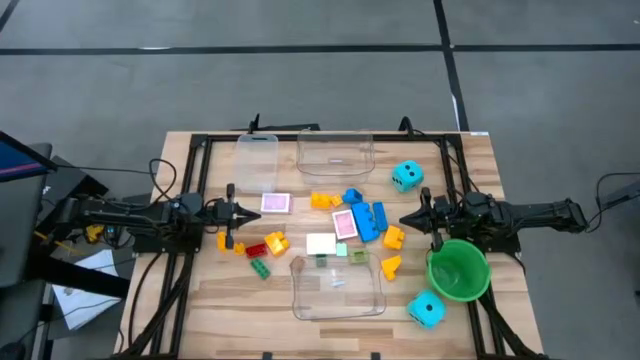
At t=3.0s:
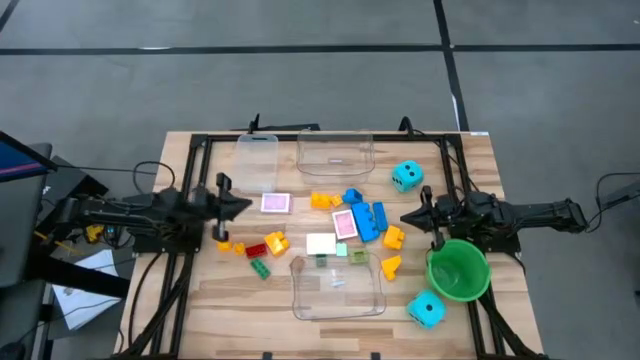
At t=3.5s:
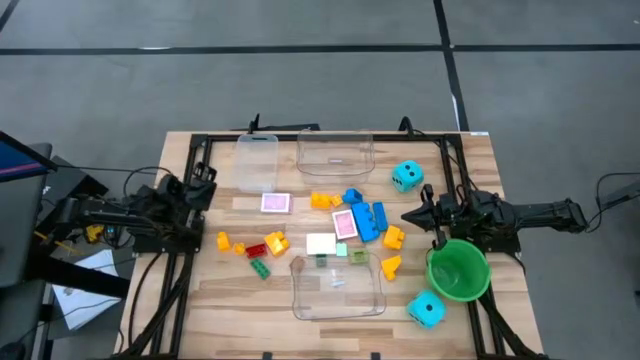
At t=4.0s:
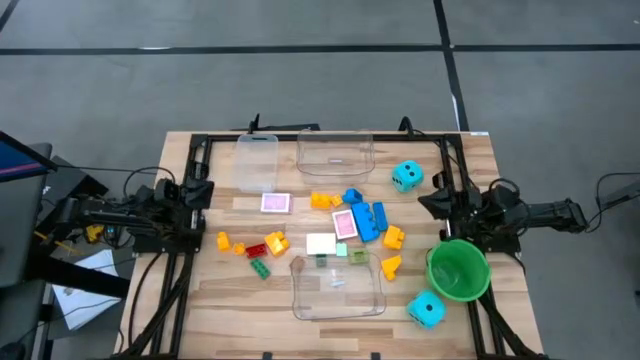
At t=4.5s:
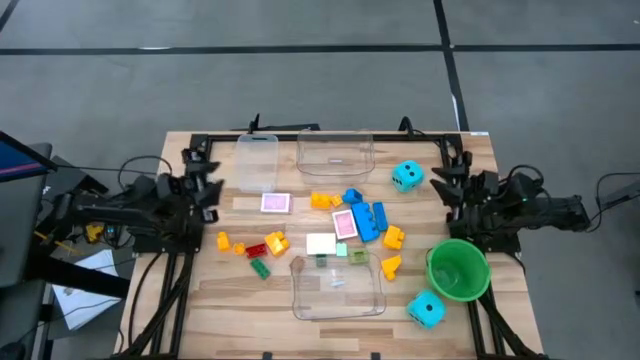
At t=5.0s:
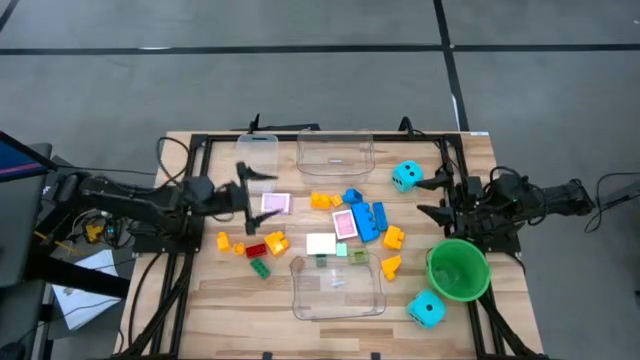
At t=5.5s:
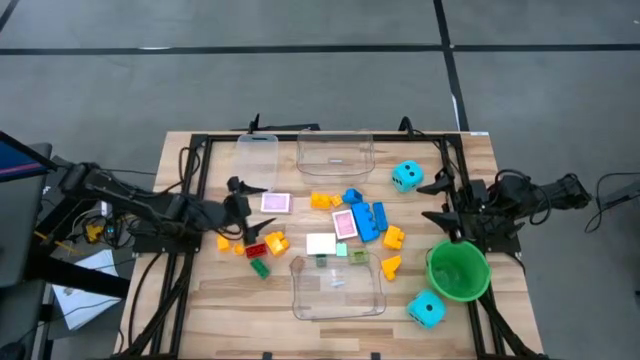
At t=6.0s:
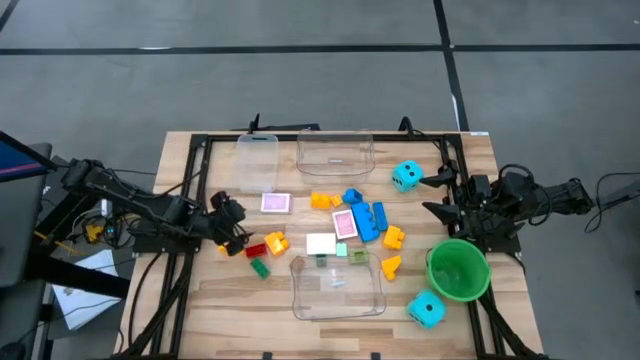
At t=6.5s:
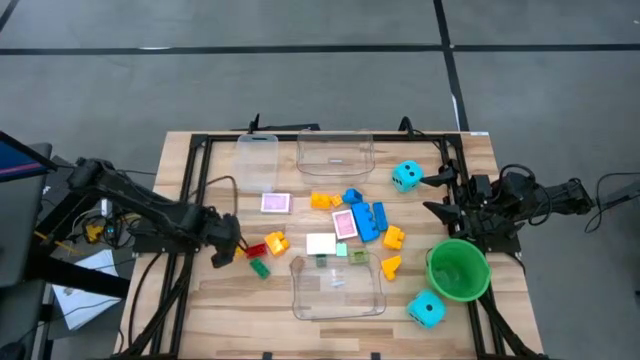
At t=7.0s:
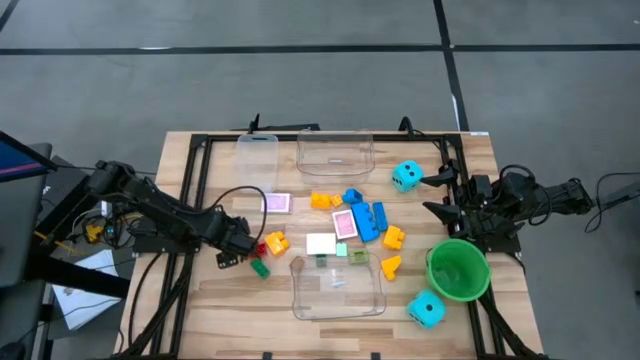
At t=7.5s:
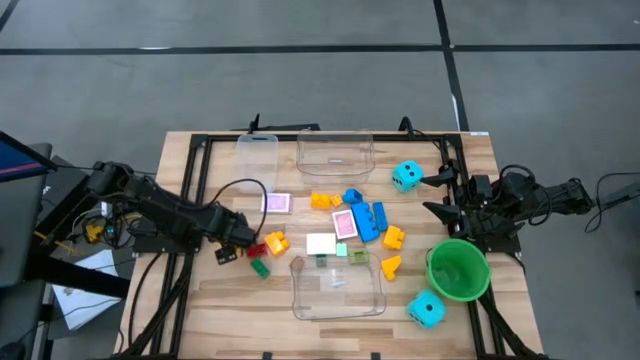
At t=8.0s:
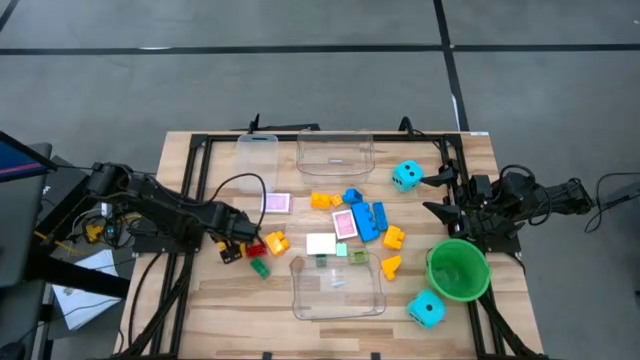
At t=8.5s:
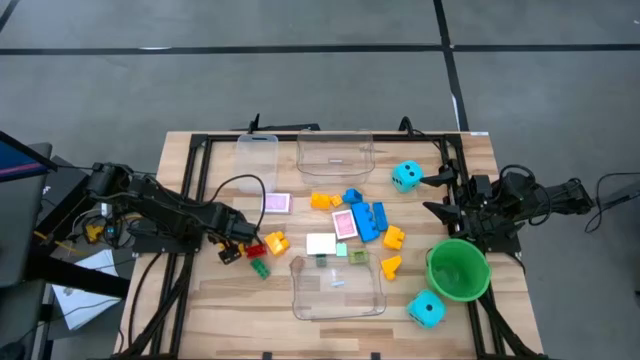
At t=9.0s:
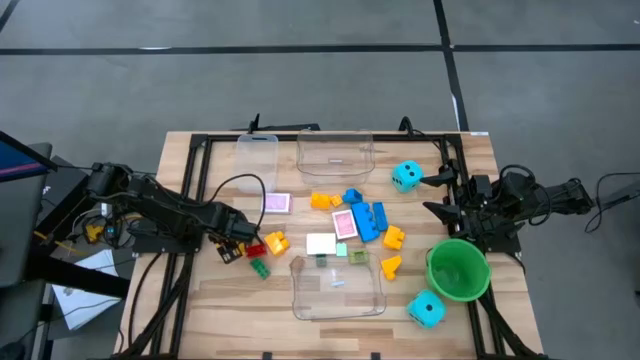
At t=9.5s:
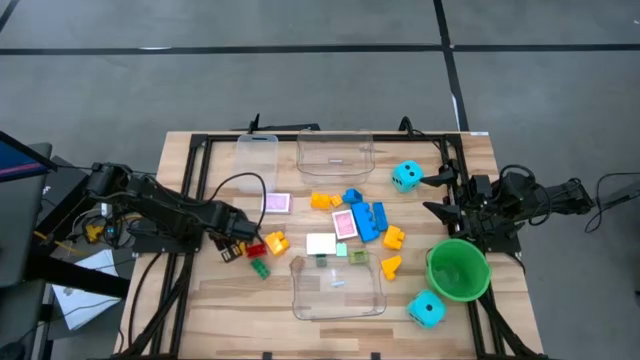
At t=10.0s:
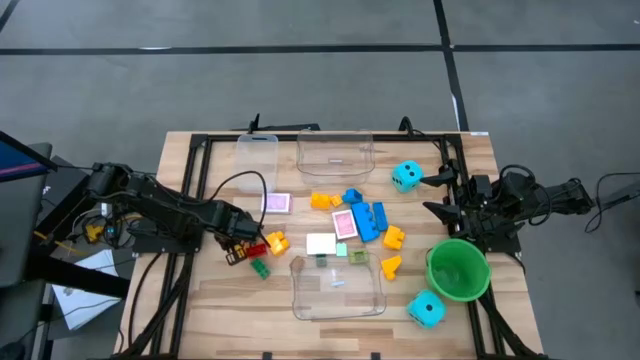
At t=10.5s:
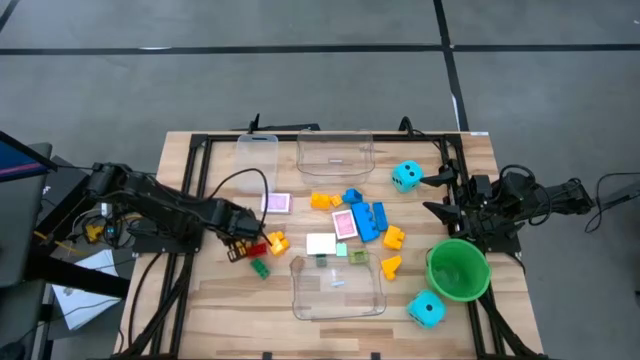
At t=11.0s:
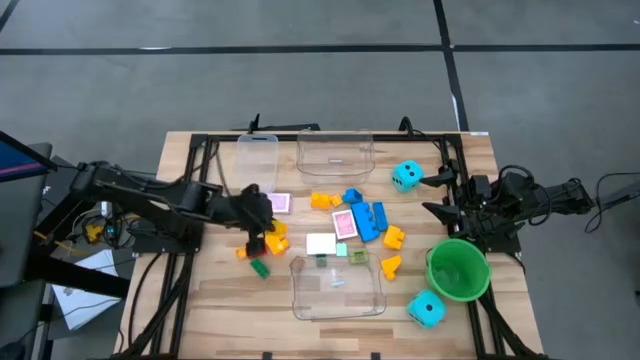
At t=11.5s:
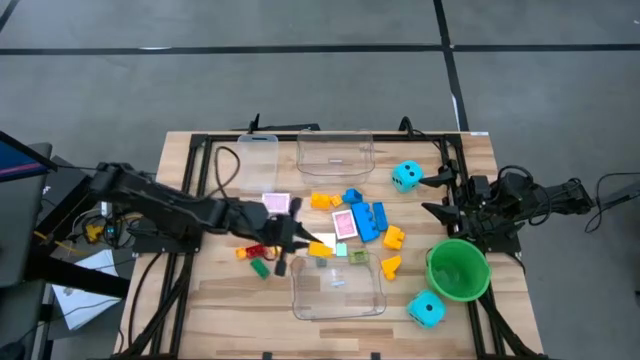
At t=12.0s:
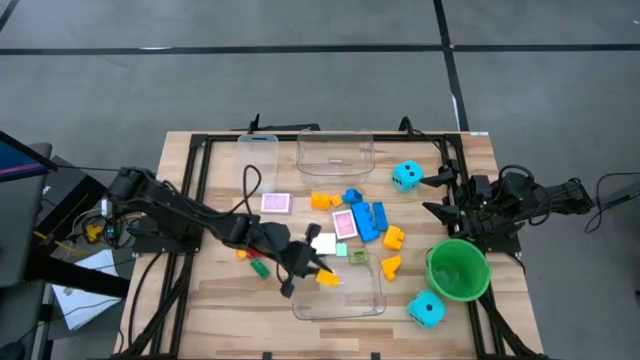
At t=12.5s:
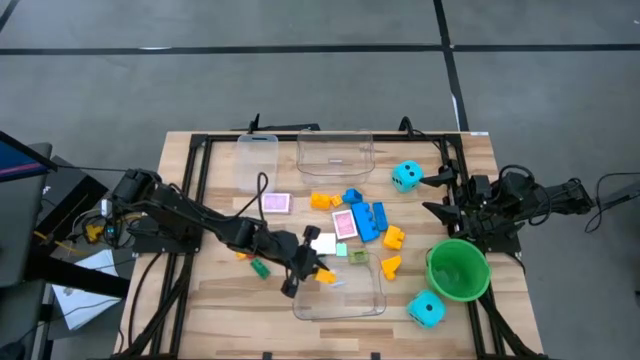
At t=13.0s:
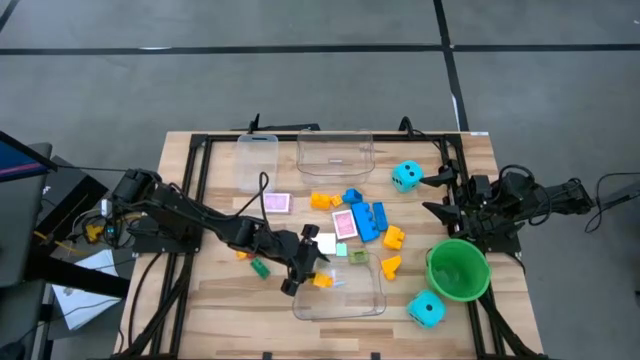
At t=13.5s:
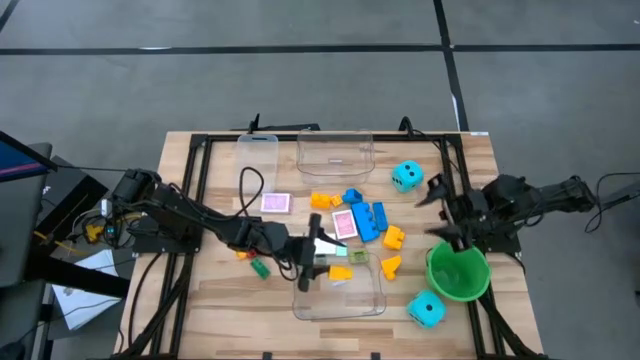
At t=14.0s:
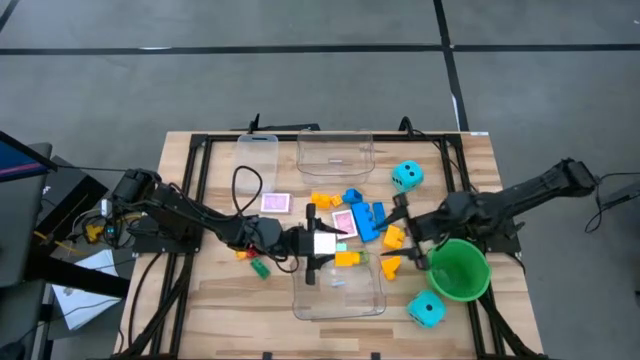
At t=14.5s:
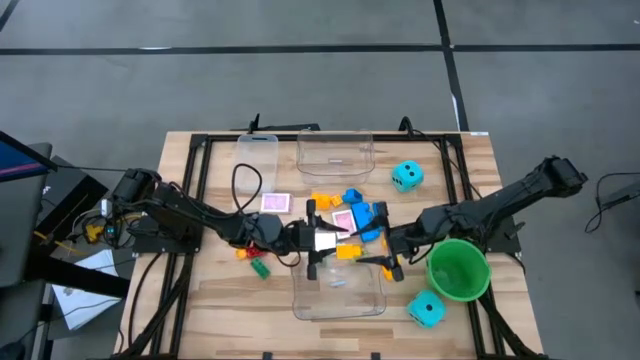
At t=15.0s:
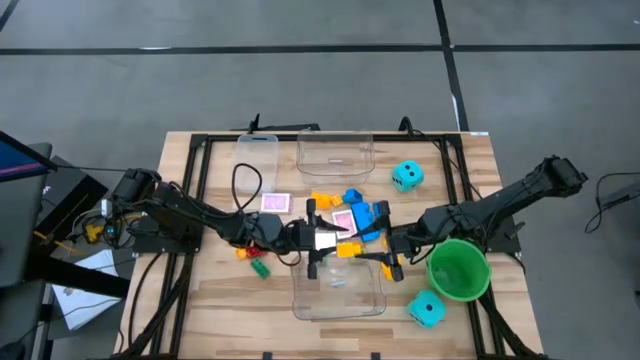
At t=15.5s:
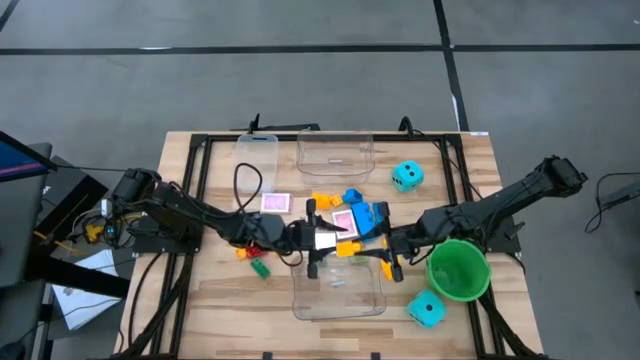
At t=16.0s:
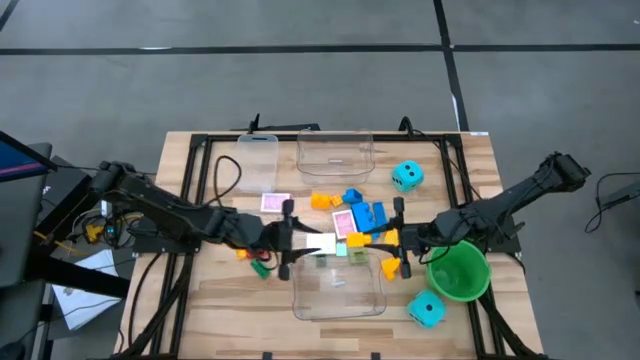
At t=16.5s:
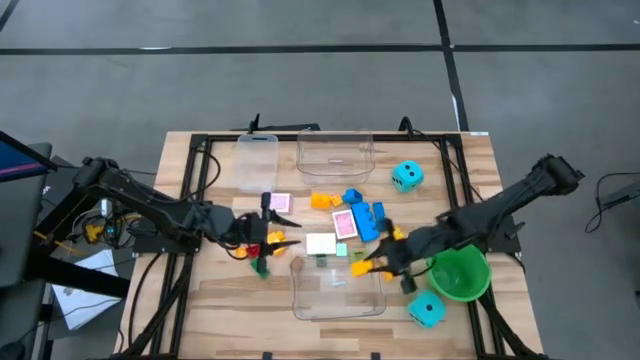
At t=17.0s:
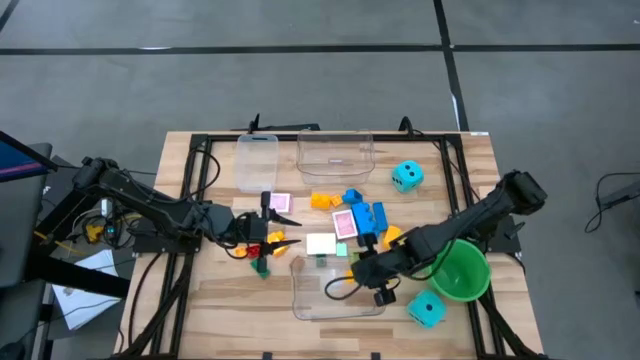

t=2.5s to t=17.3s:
Task: Pick & Place Toys
Put the yellow game piece into the bottom transparent bin
